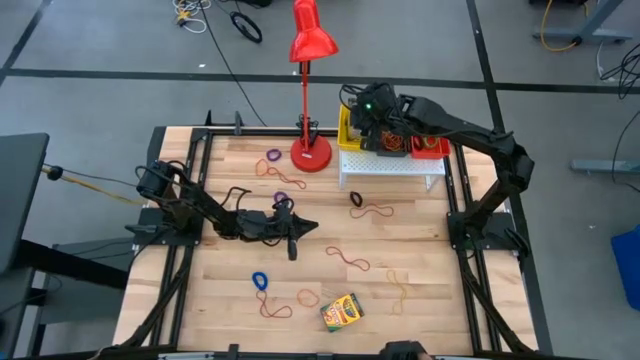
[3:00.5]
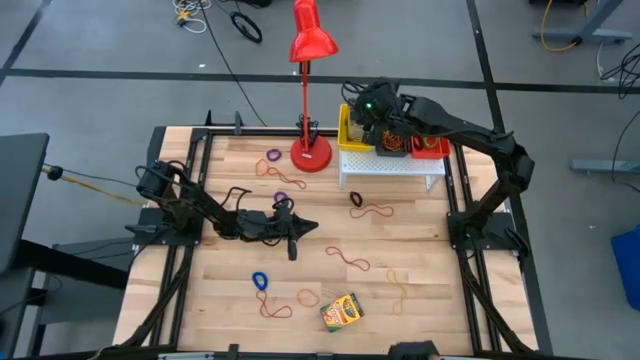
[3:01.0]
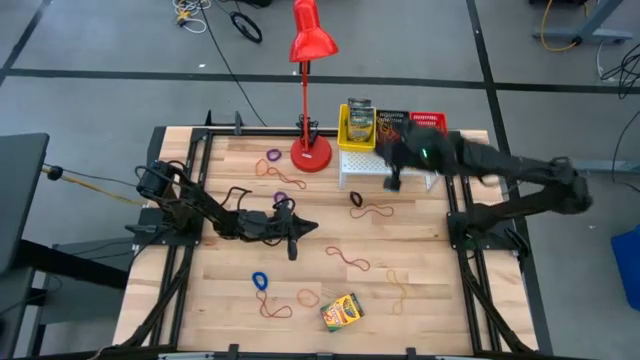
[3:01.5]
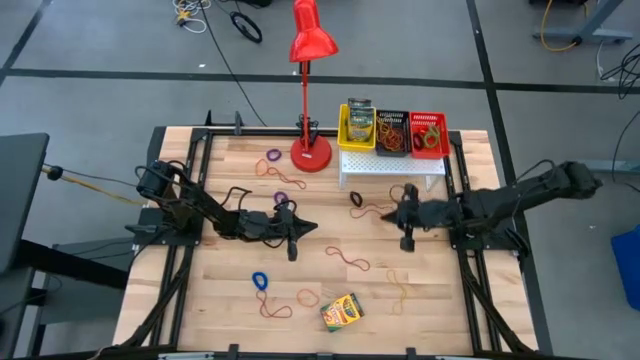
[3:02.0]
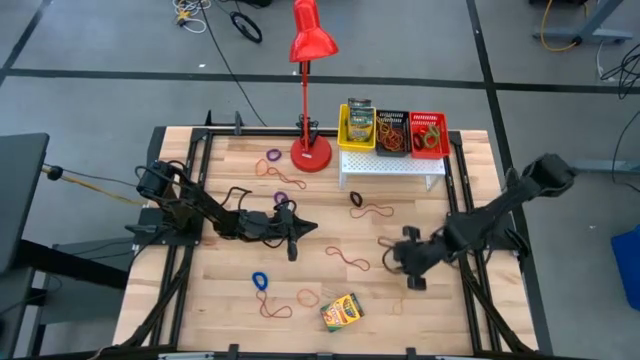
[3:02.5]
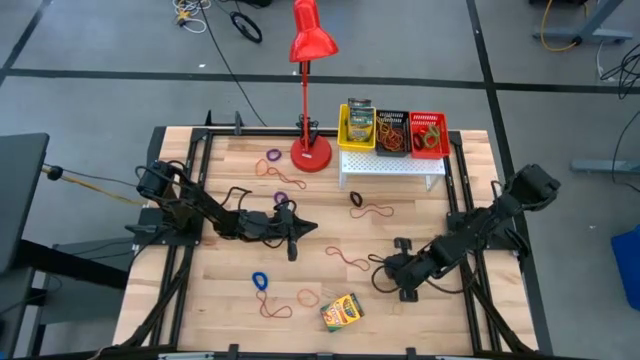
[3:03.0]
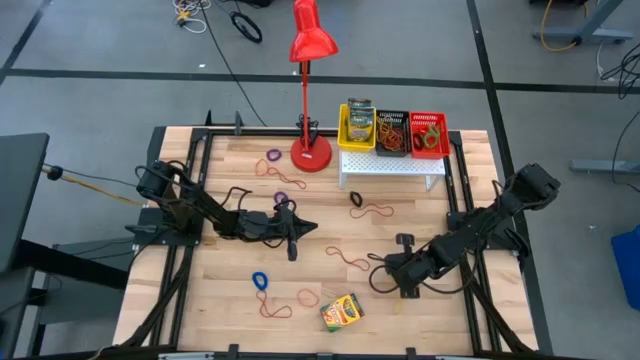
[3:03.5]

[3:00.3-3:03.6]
Task: Pick & Place Office Desk Supplies
Put the yellow rubber band into the black bin on the shelf

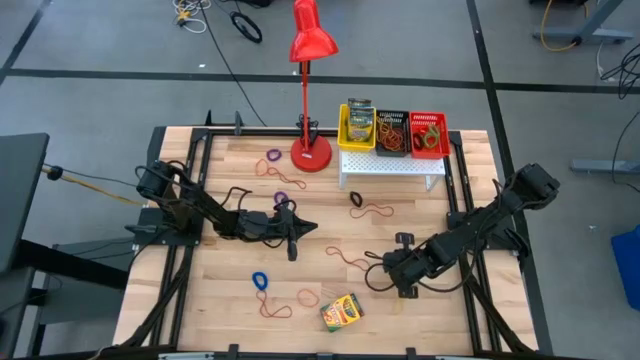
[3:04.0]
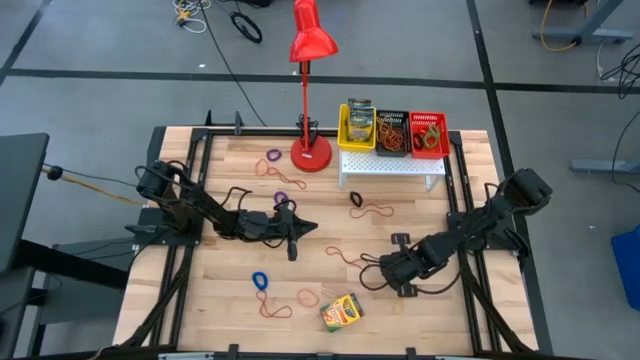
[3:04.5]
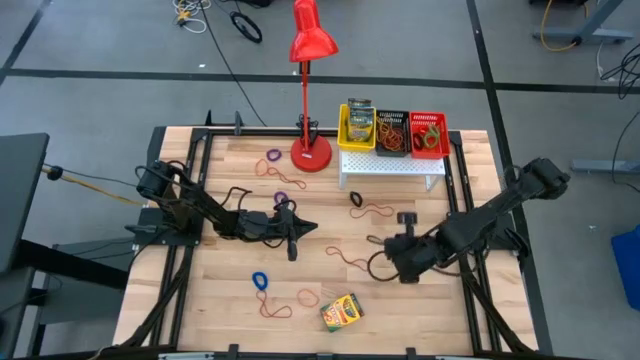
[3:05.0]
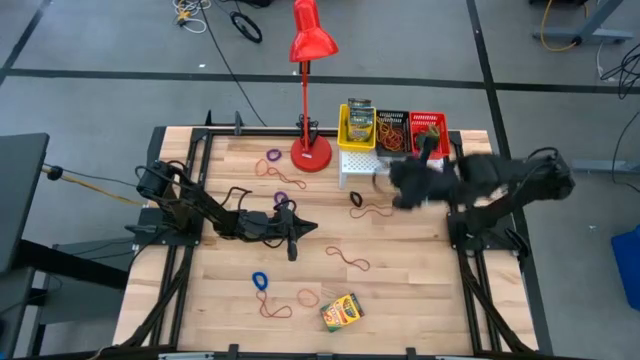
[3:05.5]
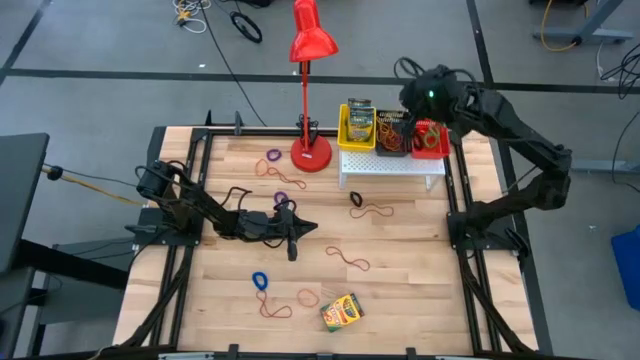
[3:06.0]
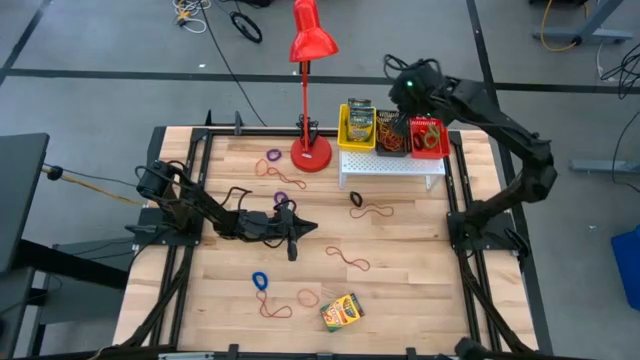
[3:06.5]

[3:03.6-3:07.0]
Put the yellow rubber band into the black bin on the shelf

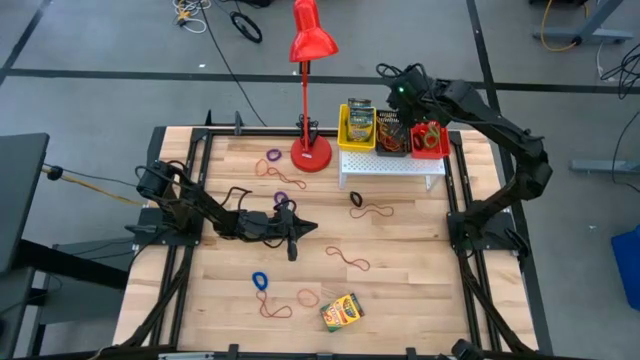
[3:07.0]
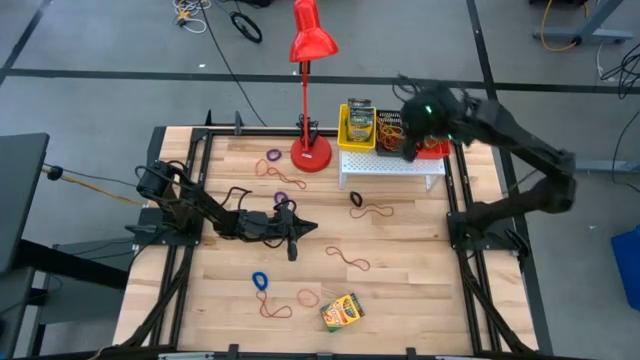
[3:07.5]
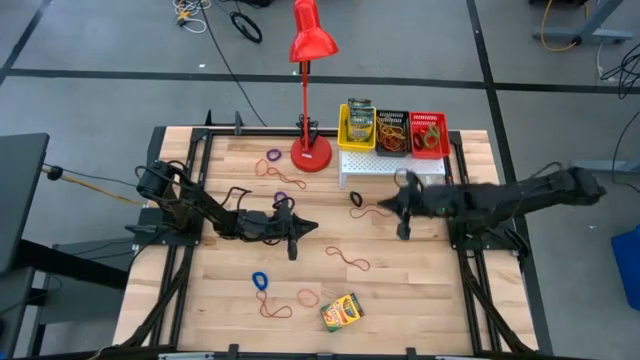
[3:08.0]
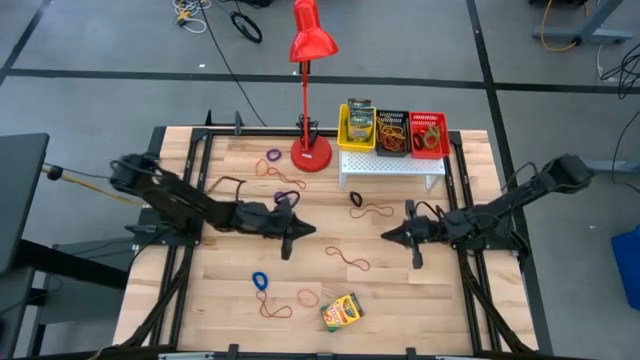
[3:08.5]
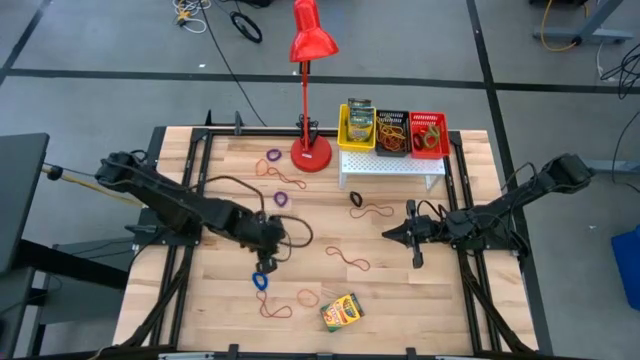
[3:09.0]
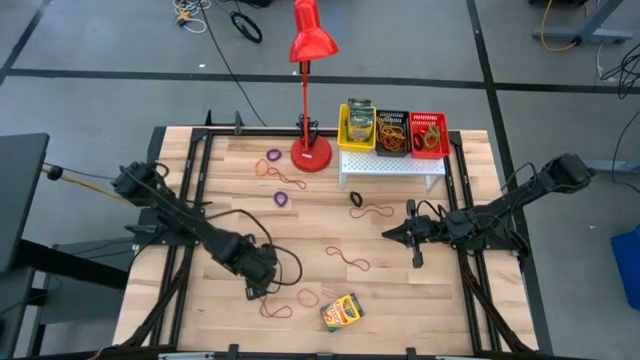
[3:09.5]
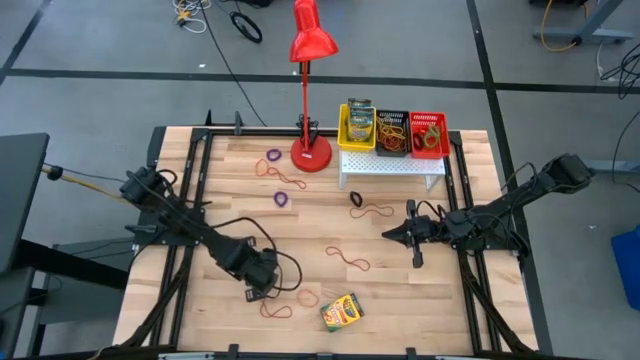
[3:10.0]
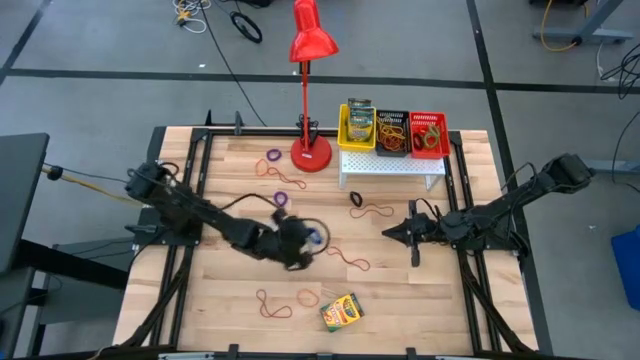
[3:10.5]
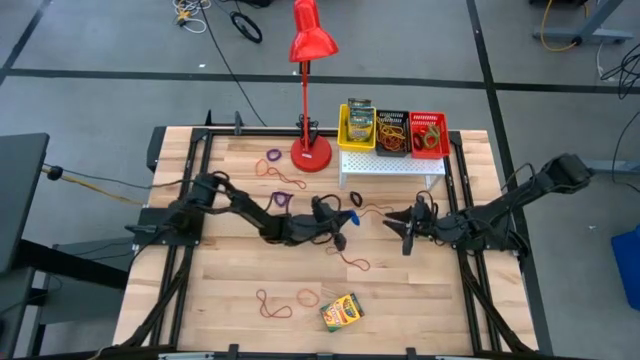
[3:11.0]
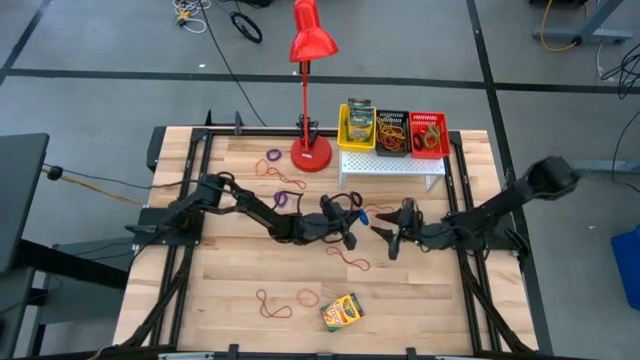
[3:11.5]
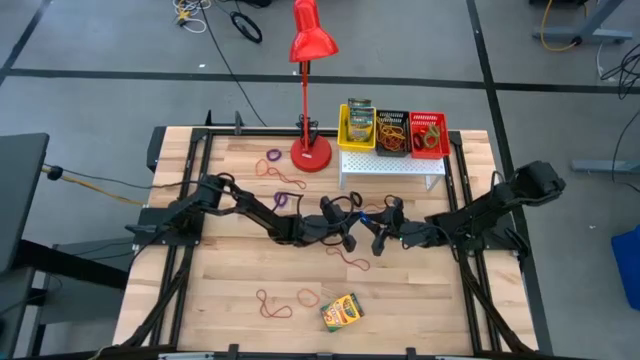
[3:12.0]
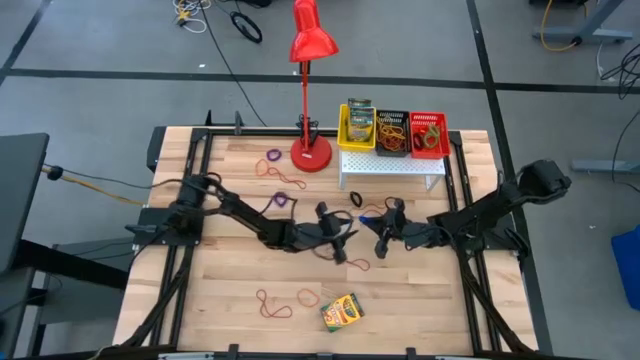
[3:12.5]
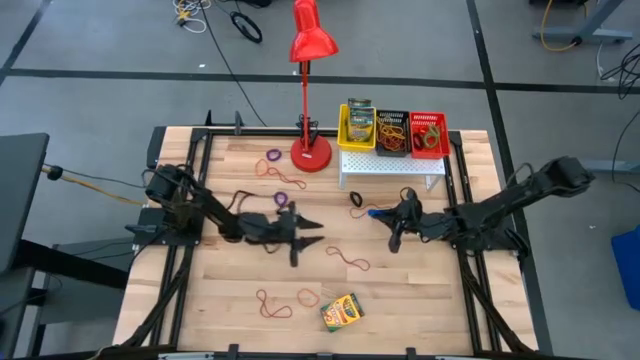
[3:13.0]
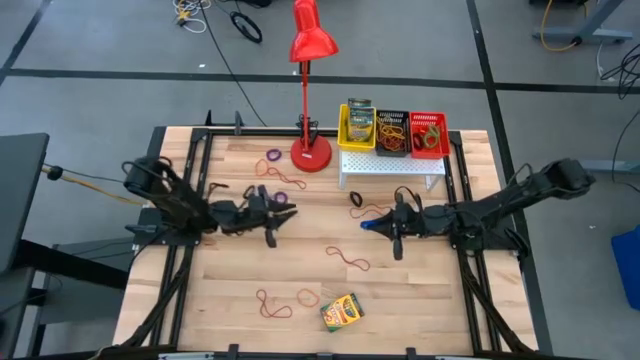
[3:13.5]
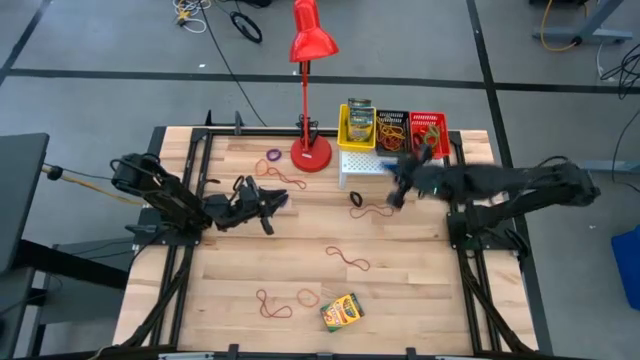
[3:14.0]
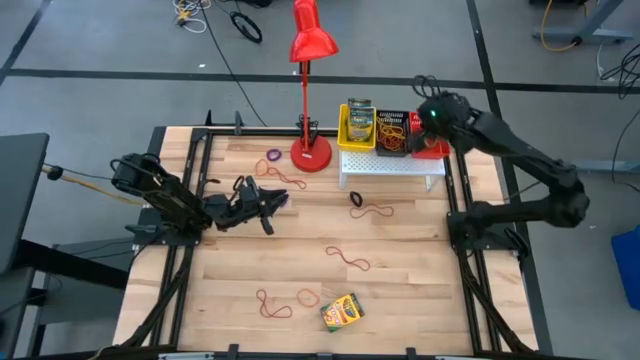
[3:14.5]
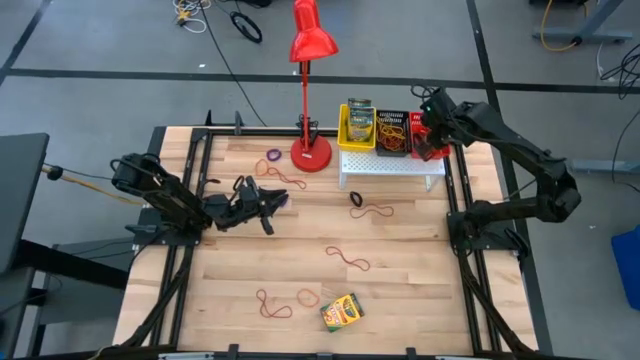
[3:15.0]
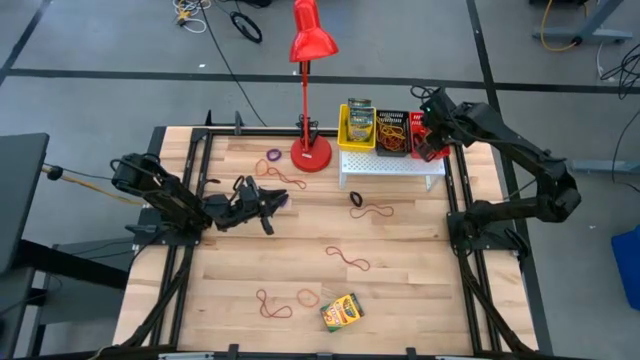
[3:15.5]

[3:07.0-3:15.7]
Put the blue spring keychain into the red bin on the shelf

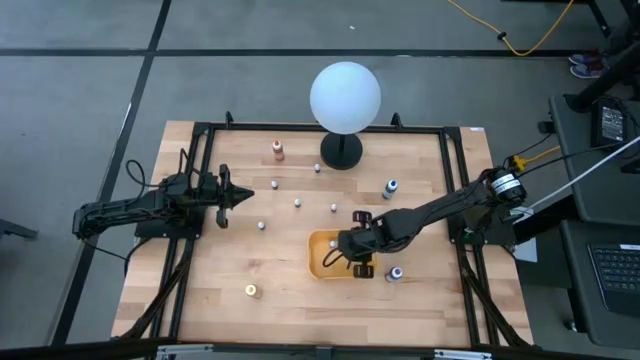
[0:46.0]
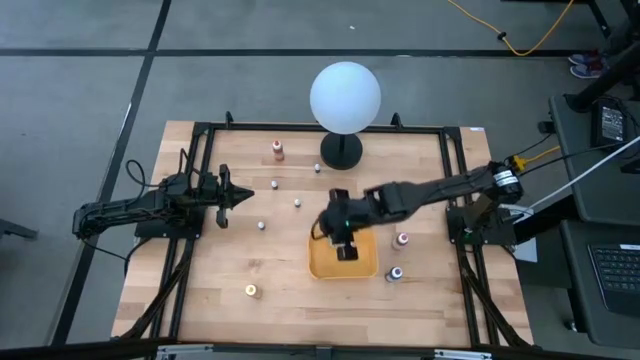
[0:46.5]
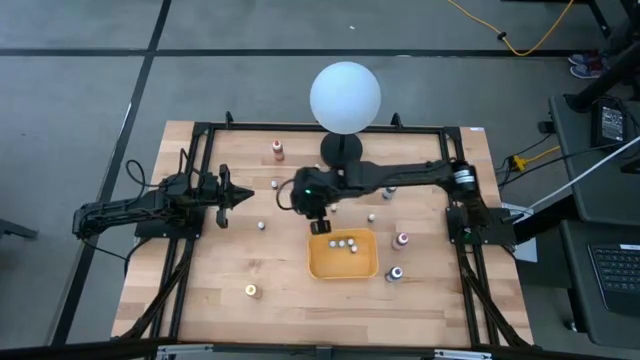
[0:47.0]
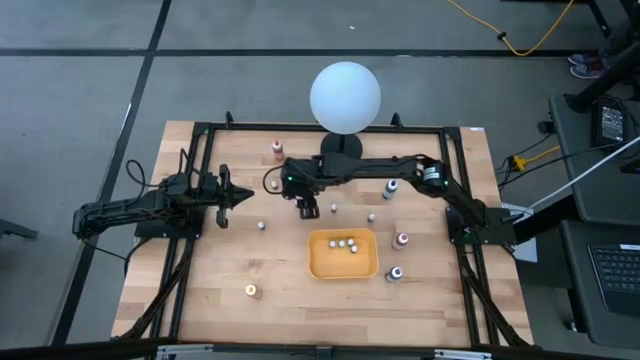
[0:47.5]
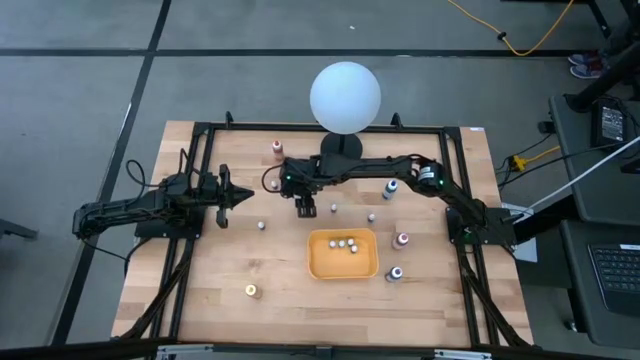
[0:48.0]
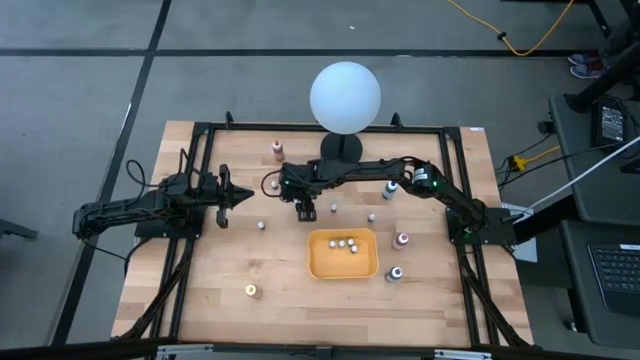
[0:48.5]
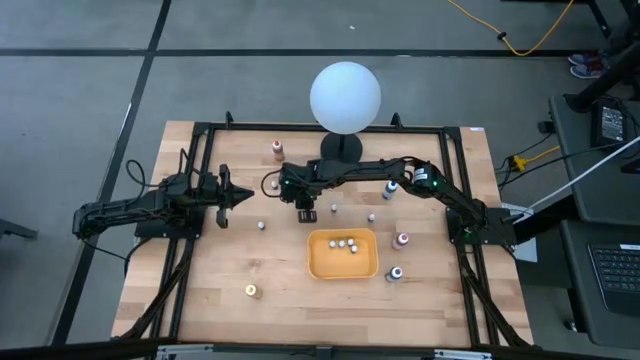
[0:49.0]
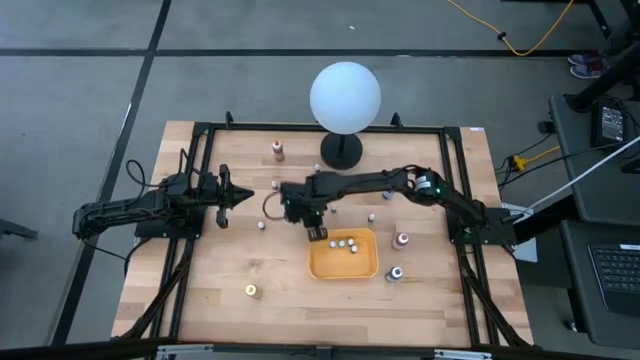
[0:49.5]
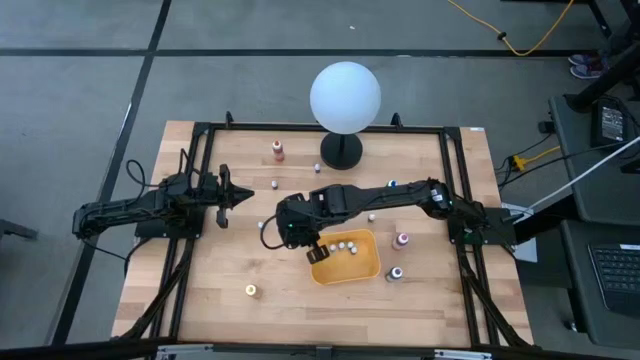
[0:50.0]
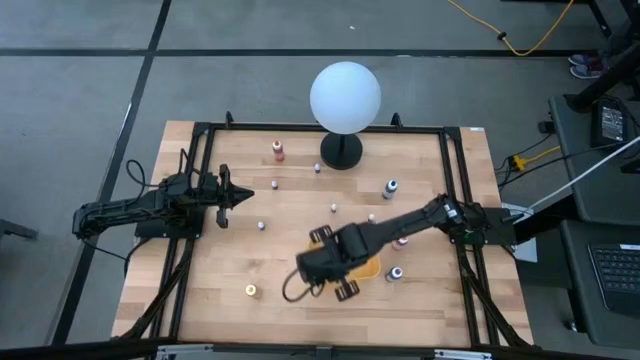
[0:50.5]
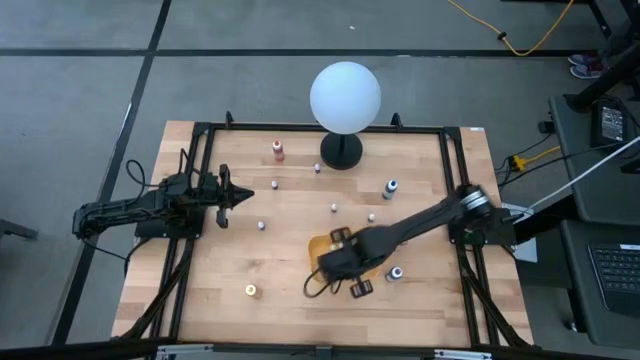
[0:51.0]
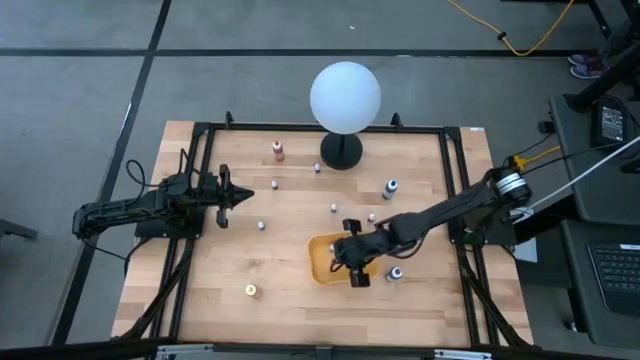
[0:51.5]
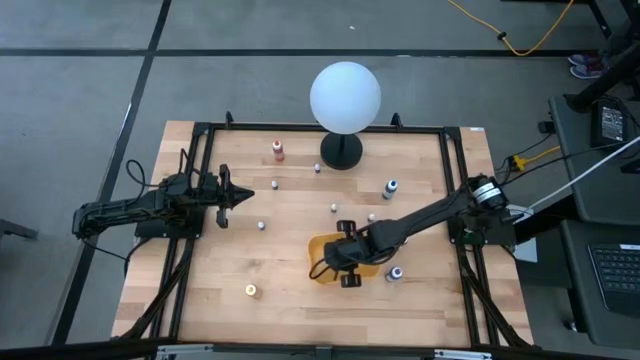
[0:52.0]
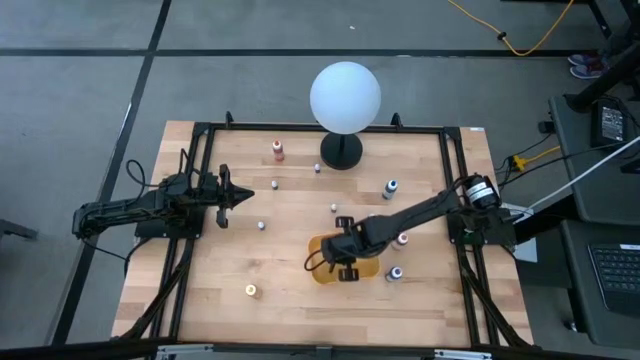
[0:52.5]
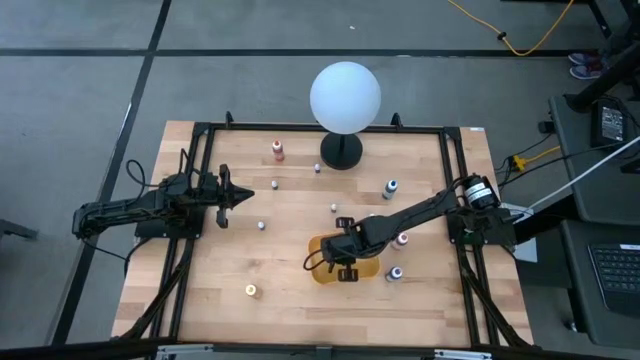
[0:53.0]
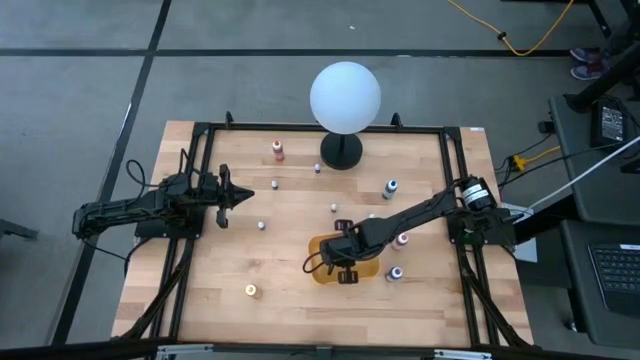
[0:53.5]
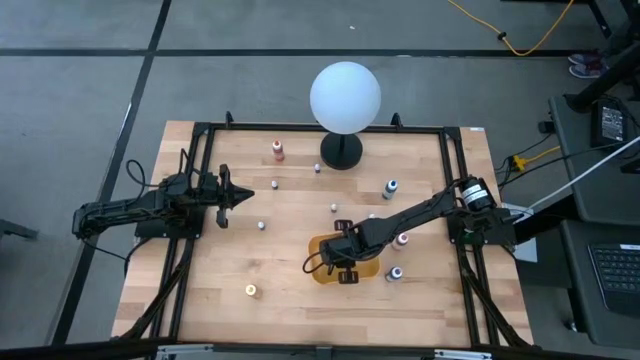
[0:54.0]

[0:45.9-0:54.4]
Task: Pick & Place food coloring
Put the small pink food coloring bottle into the yellow bin
